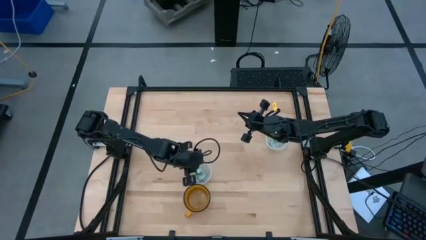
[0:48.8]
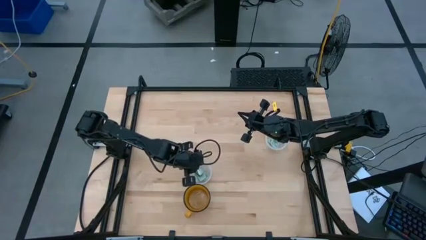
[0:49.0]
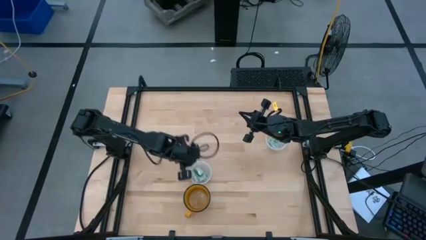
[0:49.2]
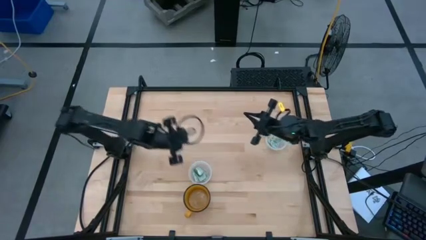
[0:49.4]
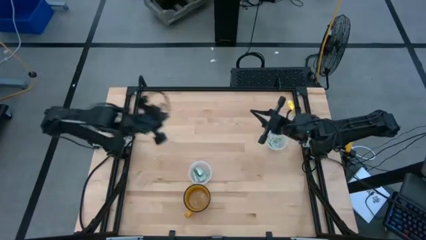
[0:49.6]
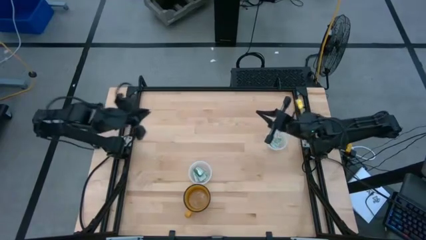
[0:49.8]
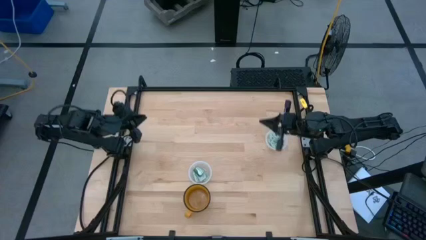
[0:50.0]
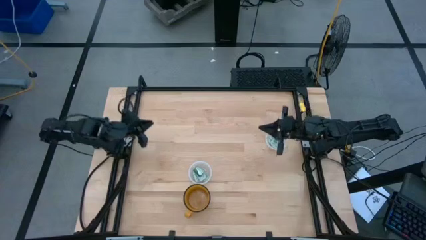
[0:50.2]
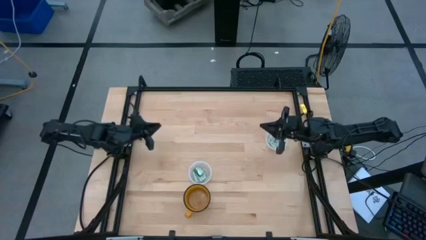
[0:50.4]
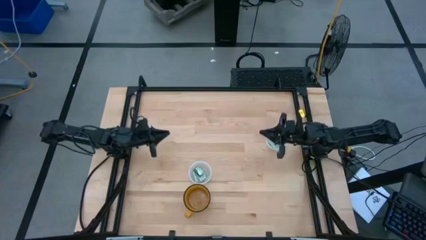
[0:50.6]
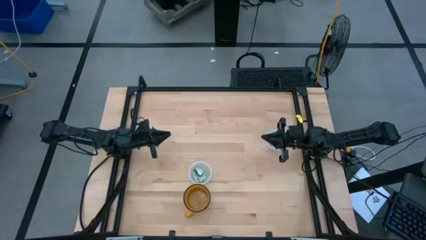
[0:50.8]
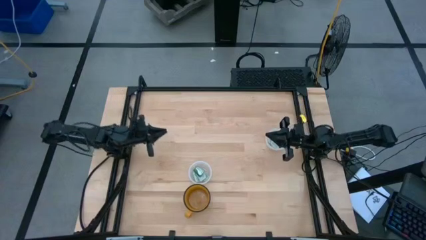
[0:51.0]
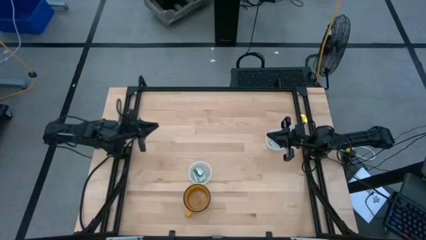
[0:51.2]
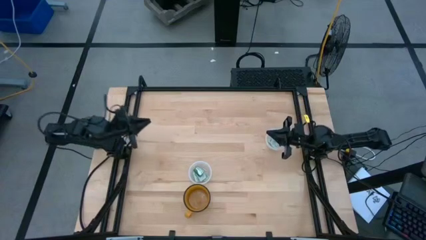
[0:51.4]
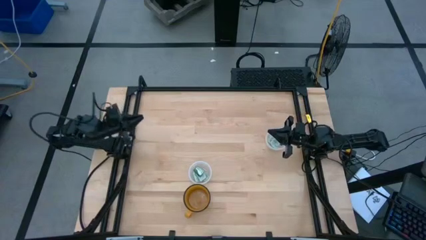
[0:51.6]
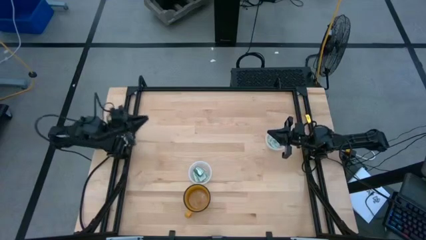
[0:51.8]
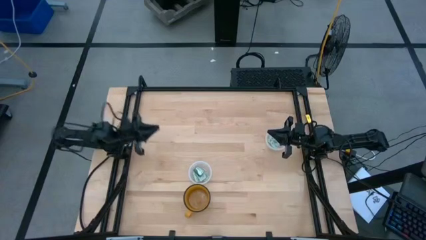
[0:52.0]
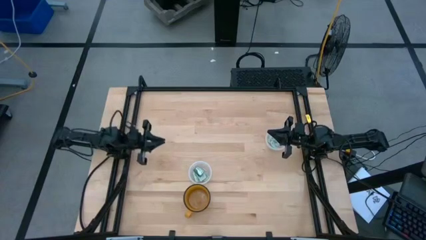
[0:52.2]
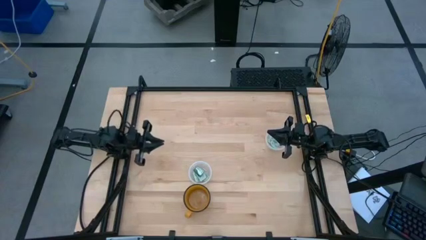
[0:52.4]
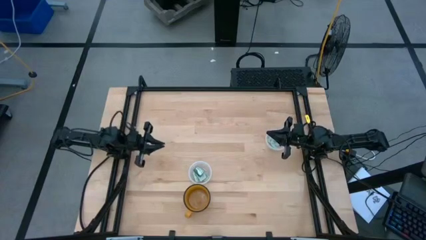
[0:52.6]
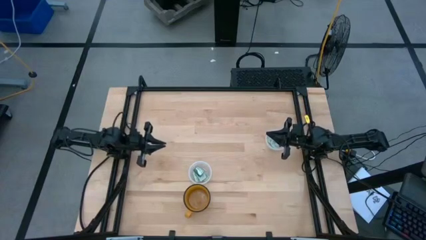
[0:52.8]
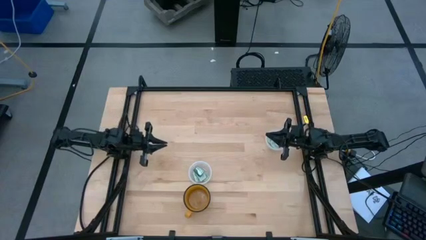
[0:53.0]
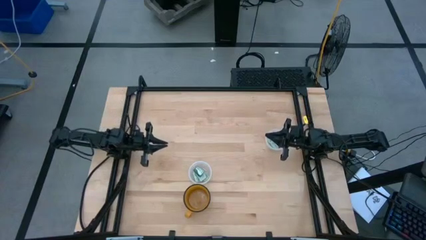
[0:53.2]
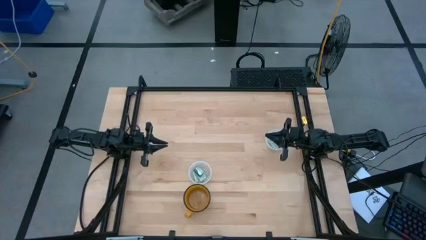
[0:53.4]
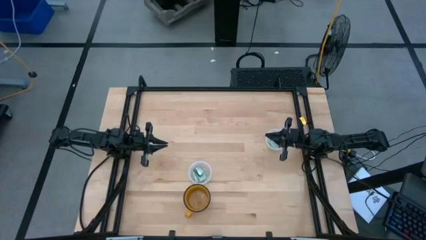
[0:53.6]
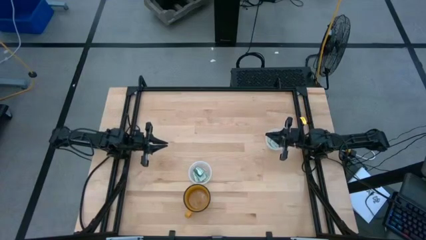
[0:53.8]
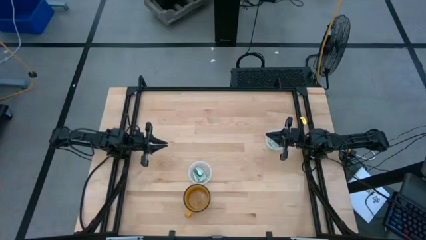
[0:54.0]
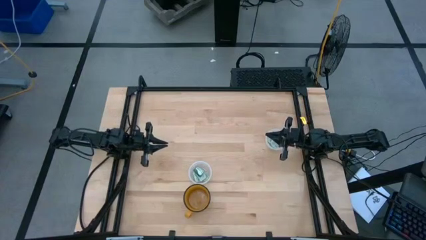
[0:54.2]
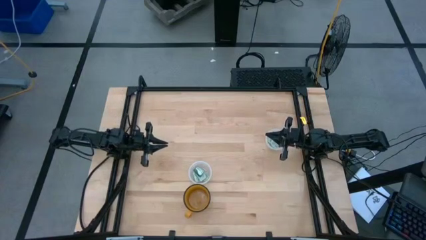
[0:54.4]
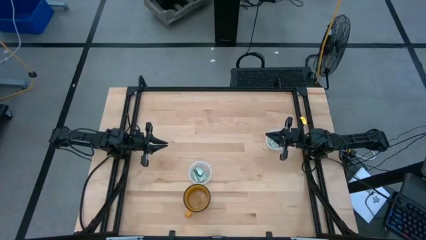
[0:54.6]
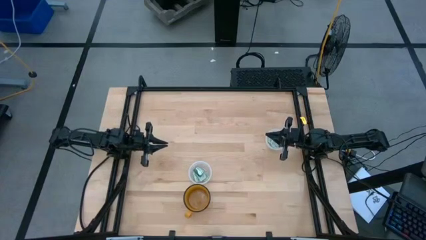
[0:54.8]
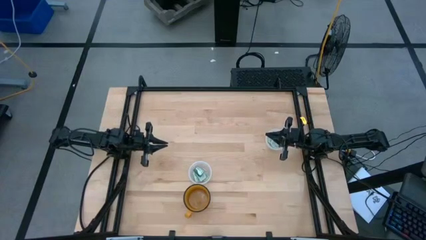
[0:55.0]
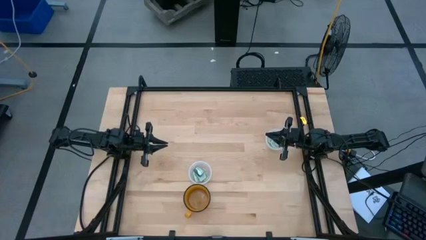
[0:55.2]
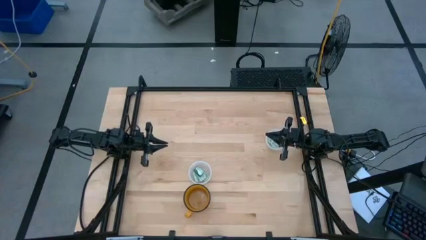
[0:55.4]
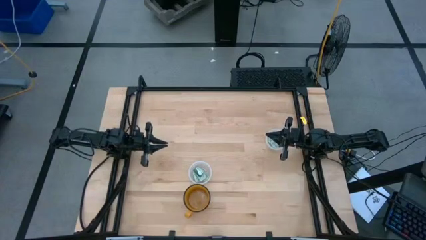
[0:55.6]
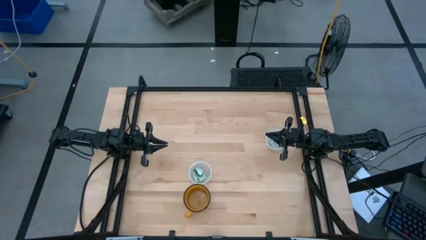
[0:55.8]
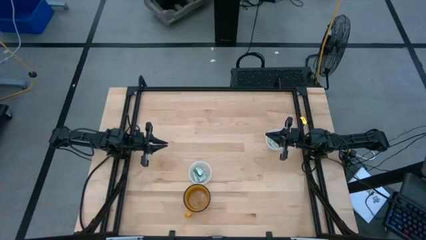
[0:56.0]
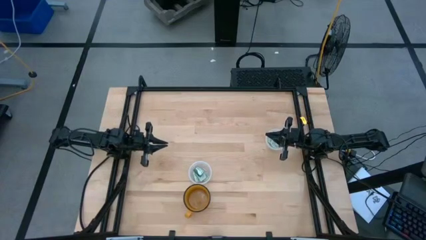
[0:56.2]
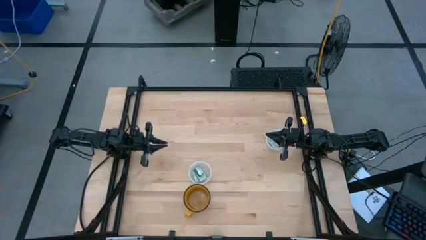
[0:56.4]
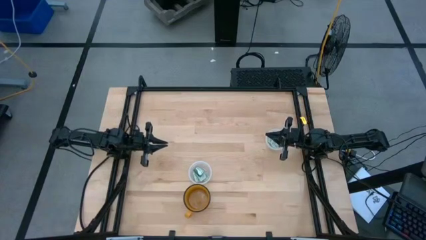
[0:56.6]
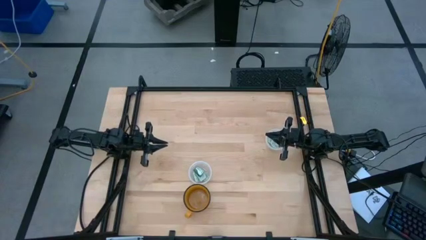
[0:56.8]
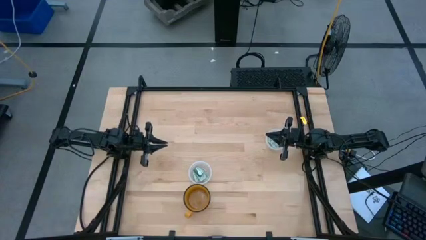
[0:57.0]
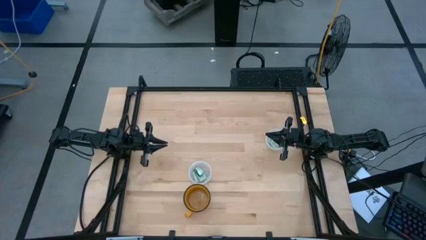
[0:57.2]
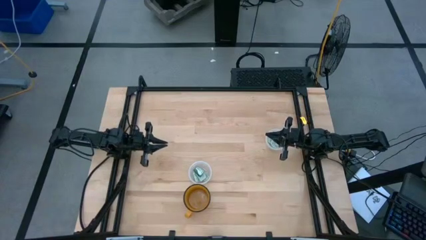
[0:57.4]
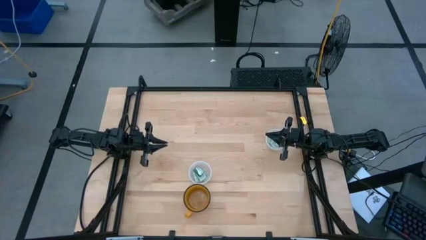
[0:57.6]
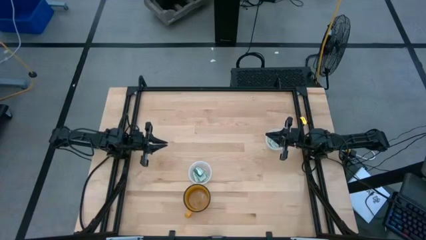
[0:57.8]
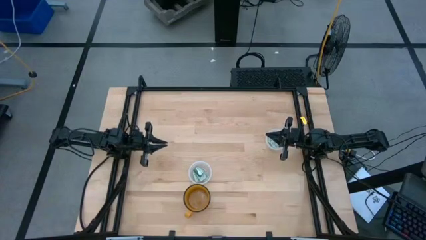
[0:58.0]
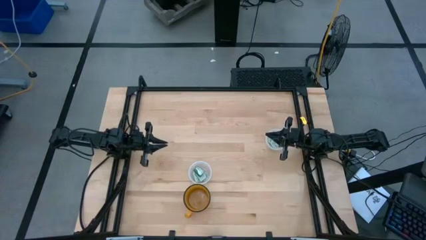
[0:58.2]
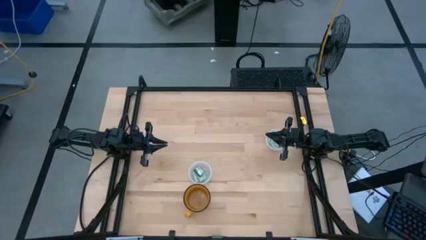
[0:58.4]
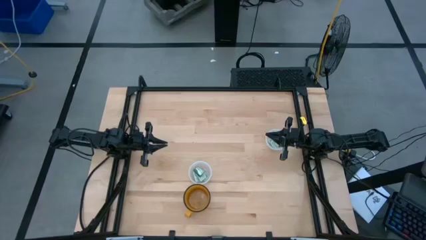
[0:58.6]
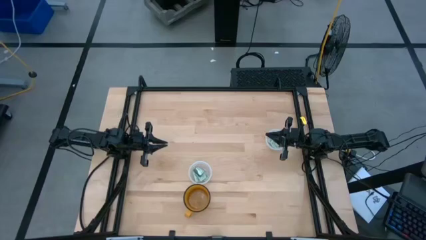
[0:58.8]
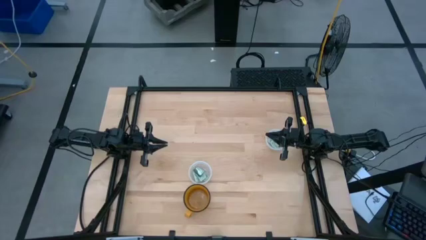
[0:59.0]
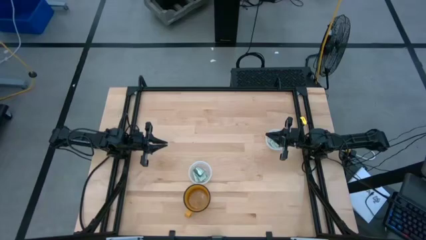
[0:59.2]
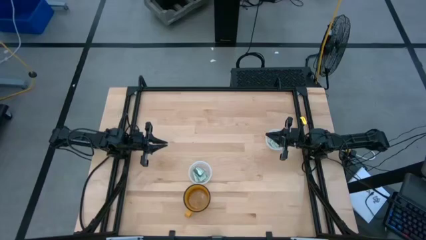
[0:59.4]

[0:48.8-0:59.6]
Task: Pick and place items into bin
Return to Home Position

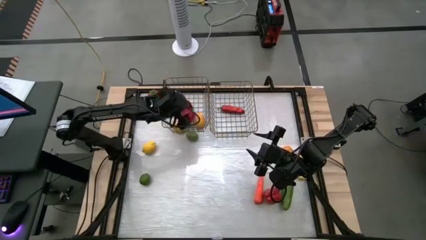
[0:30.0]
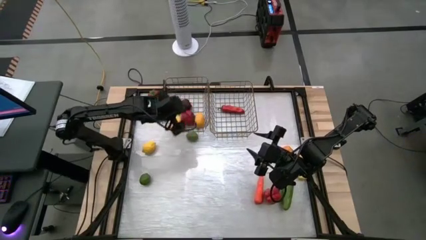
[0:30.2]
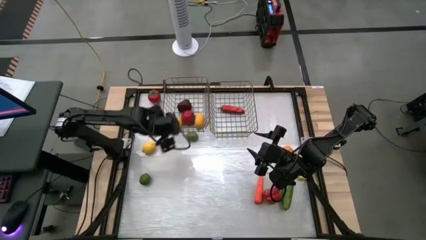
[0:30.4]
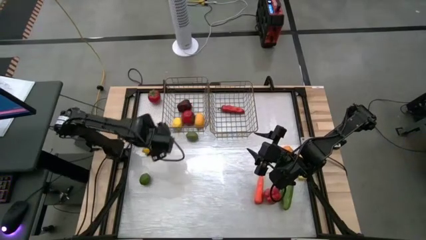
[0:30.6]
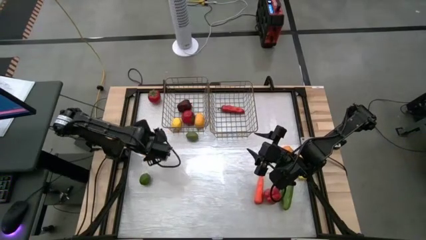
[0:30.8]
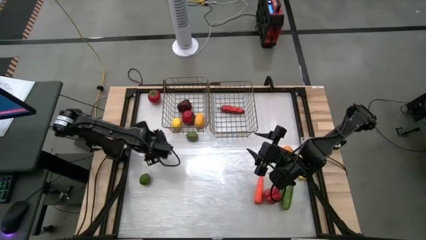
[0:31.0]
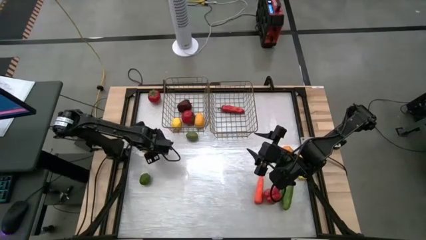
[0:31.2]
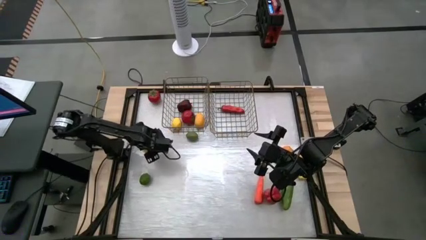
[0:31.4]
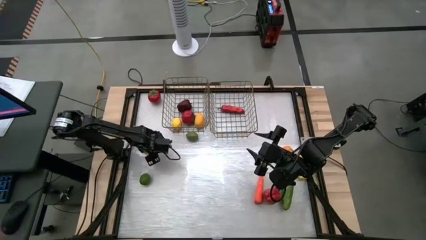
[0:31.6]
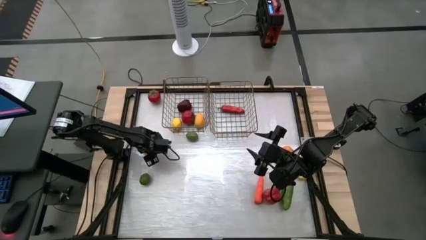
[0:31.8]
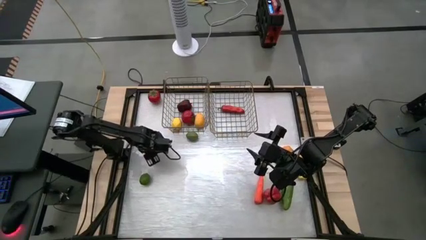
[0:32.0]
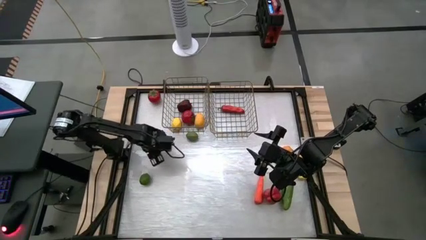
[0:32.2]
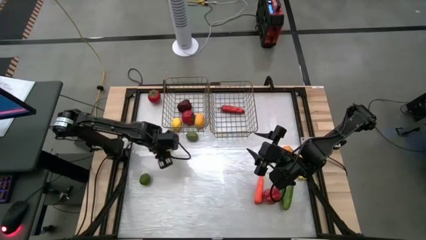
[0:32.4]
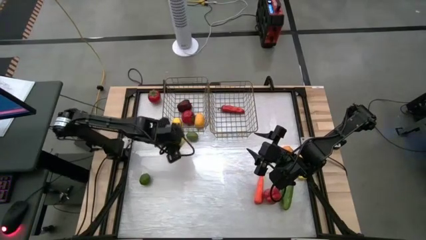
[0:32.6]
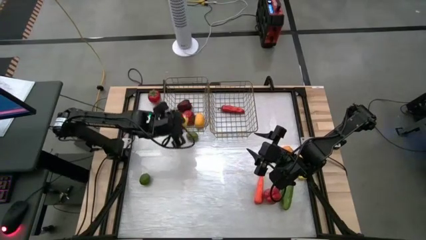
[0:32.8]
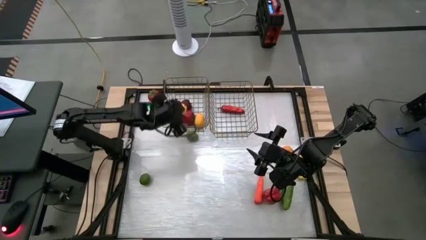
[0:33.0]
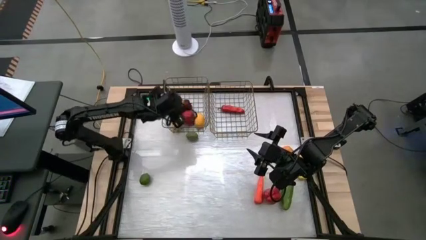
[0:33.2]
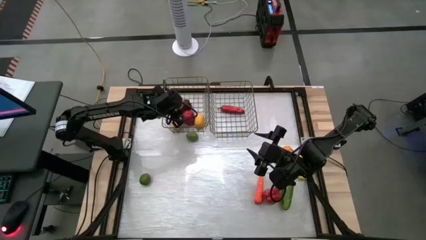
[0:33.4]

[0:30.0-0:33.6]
Task: Sort produce into baskets
Put the lemon into the left wire basket

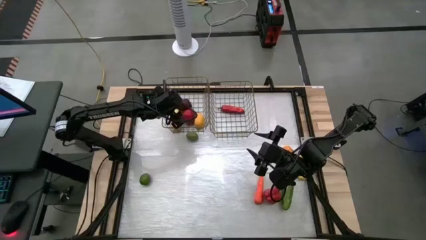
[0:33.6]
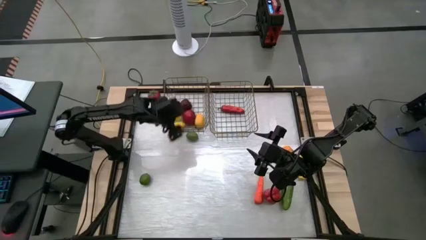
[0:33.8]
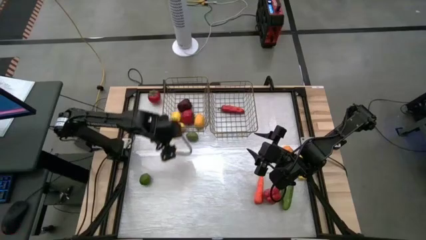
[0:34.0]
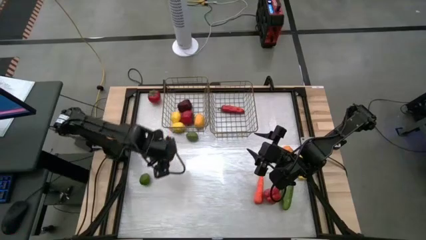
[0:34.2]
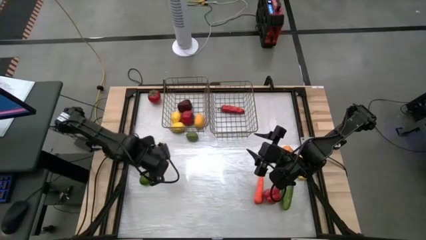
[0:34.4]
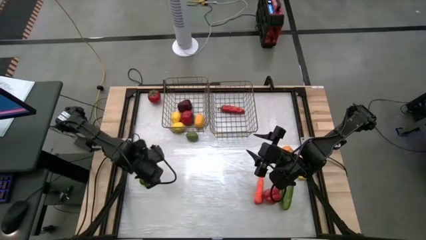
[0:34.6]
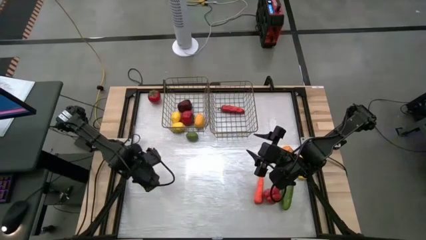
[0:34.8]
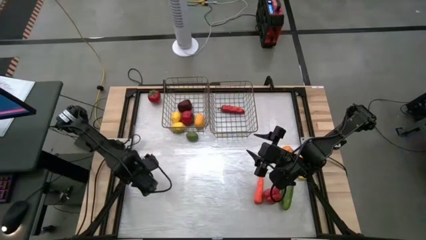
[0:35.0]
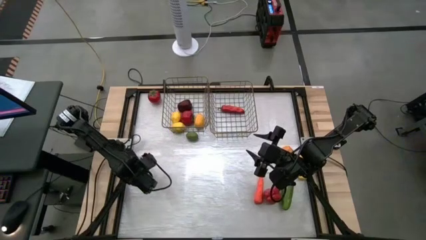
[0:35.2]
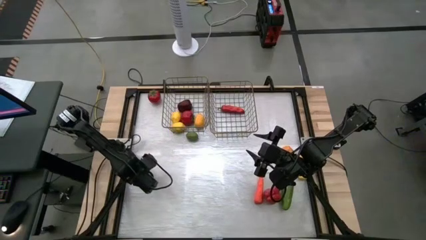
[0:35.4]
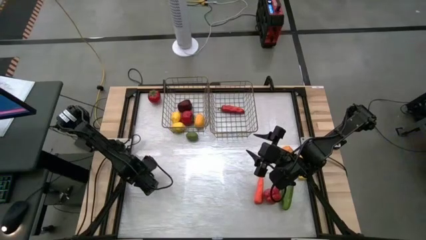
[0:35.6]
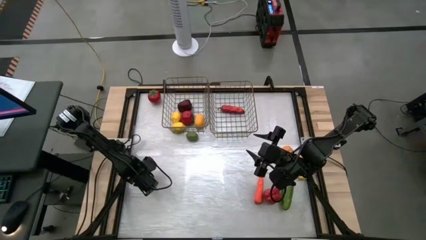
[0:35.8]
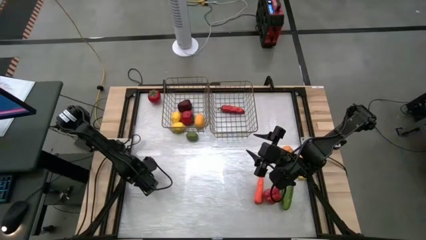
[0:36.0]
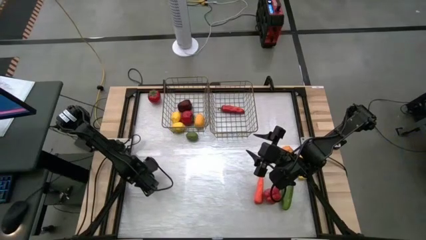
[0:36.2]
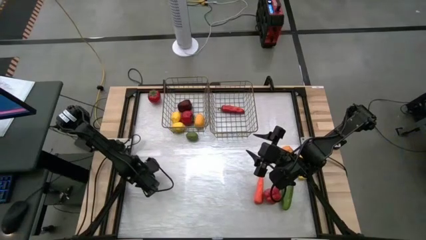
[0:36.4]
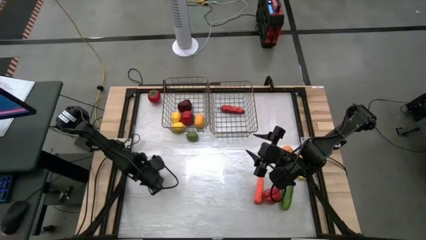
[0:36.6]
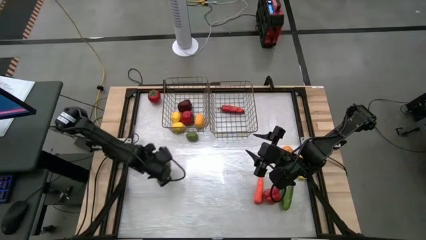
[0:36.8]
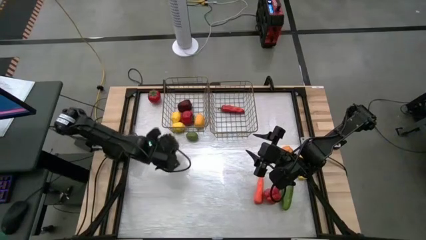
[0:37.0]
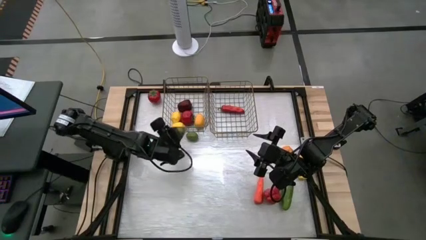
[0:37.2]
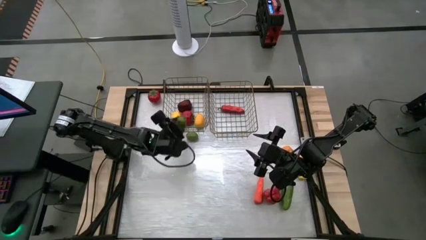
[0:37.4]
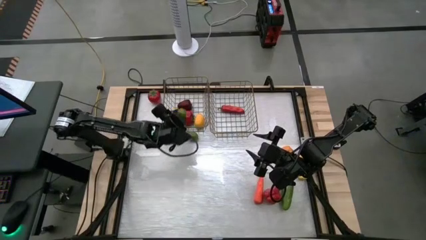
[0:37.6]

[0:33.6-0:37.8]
Put the bottom lime into the left wire basket
